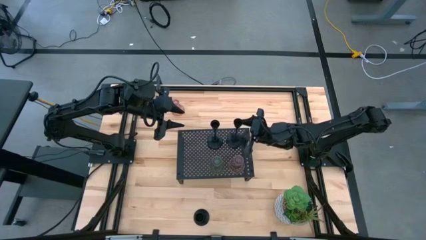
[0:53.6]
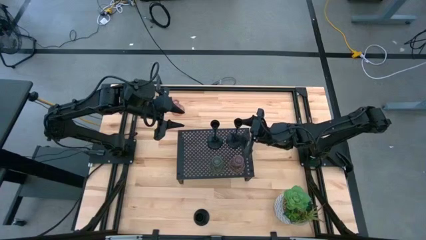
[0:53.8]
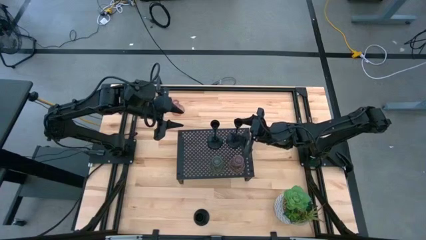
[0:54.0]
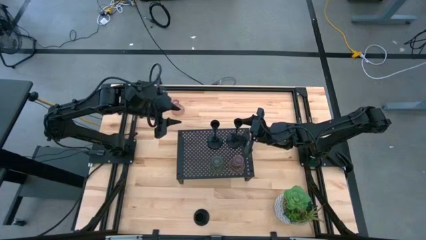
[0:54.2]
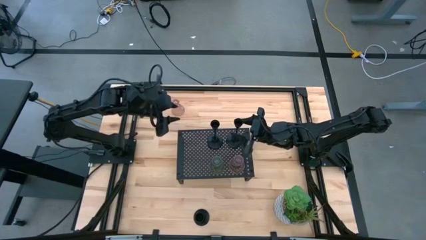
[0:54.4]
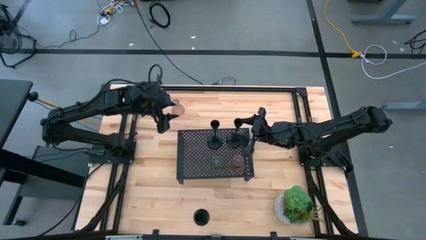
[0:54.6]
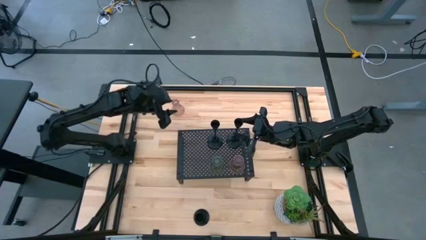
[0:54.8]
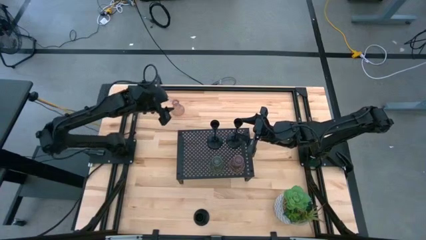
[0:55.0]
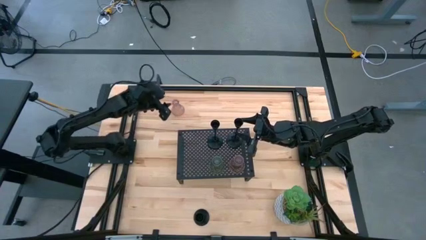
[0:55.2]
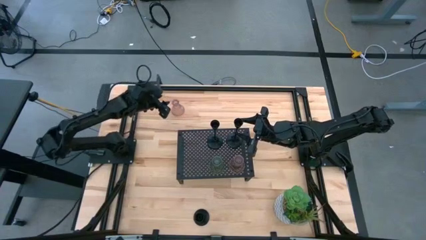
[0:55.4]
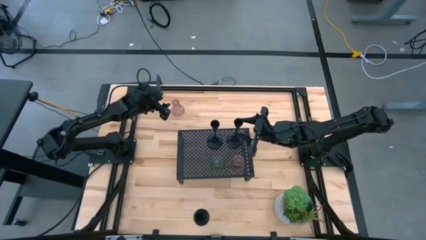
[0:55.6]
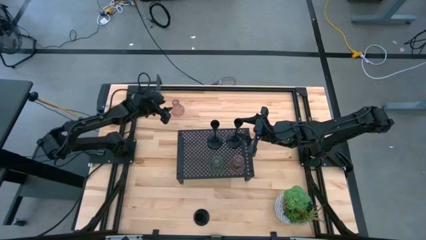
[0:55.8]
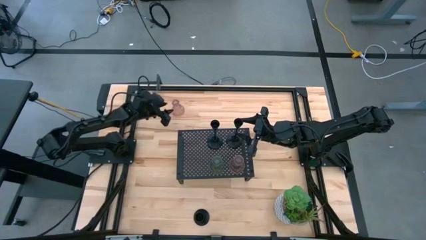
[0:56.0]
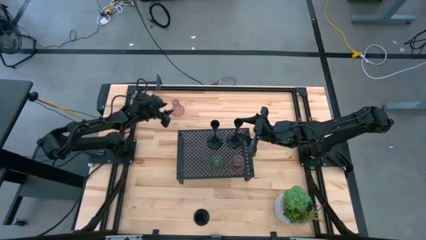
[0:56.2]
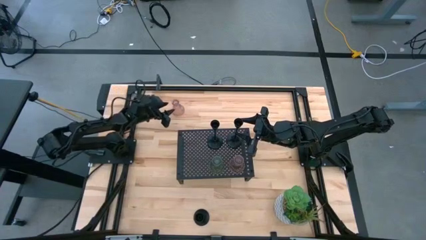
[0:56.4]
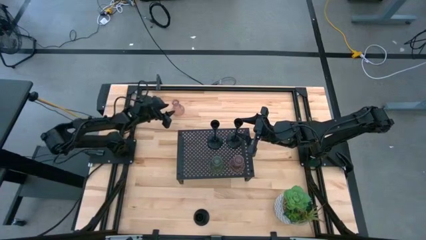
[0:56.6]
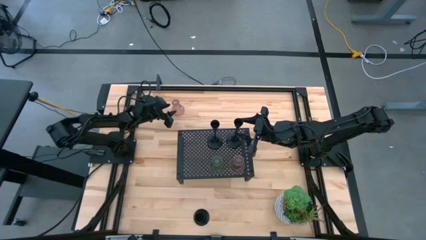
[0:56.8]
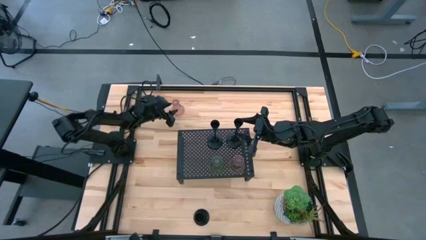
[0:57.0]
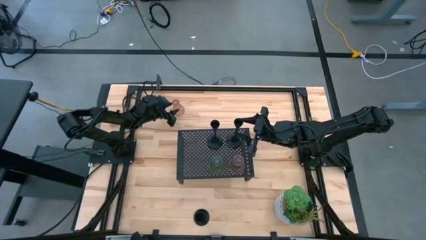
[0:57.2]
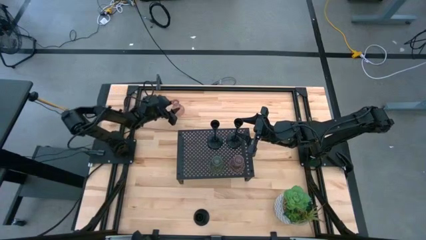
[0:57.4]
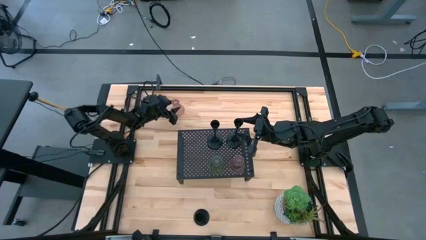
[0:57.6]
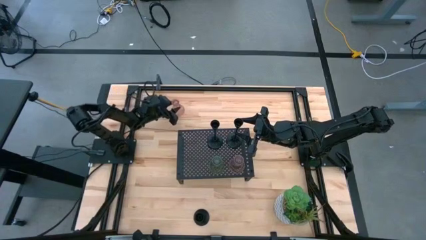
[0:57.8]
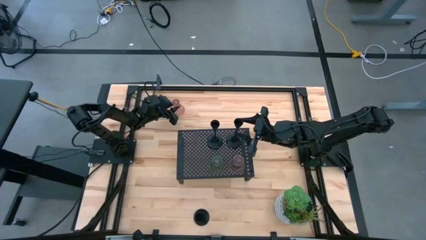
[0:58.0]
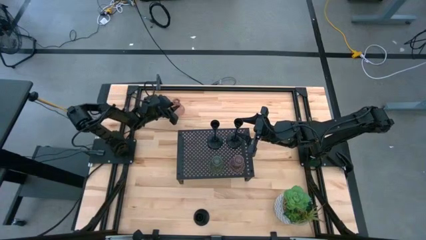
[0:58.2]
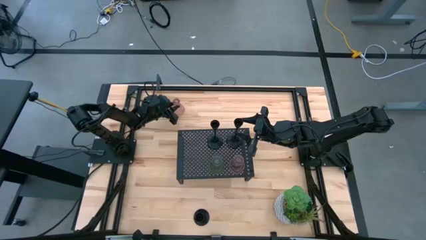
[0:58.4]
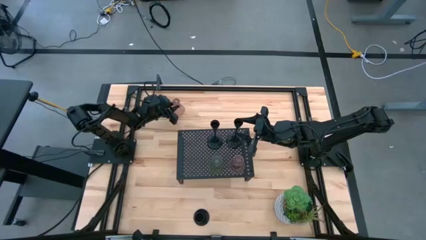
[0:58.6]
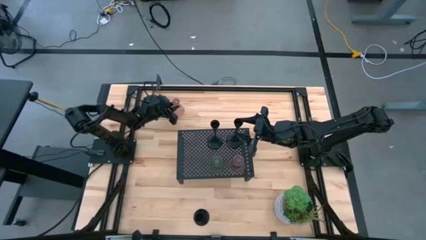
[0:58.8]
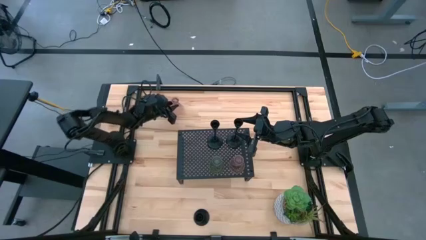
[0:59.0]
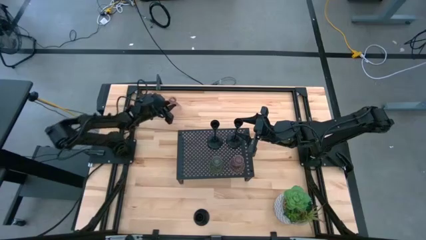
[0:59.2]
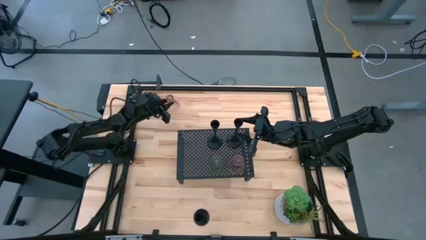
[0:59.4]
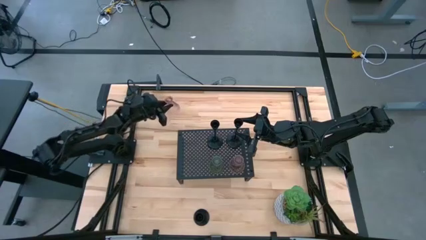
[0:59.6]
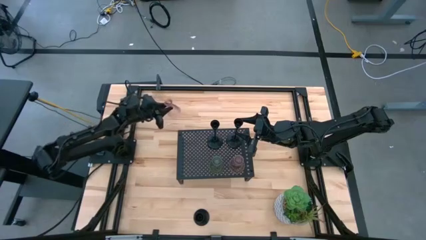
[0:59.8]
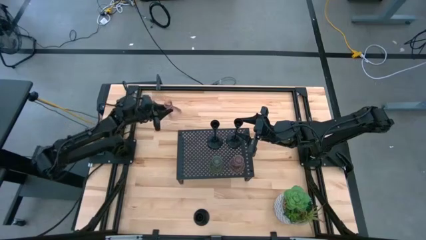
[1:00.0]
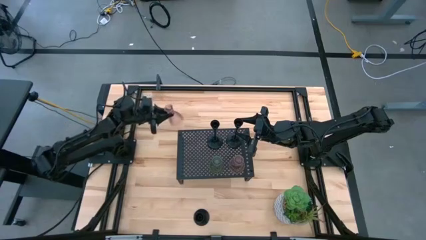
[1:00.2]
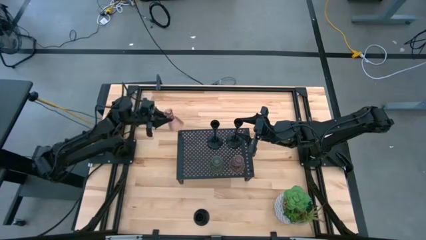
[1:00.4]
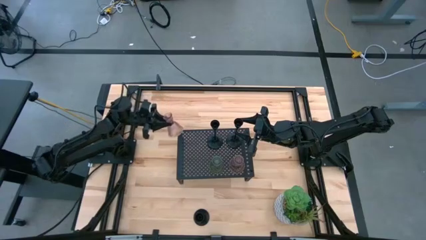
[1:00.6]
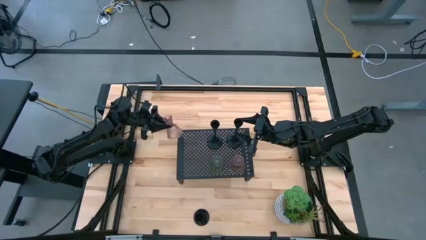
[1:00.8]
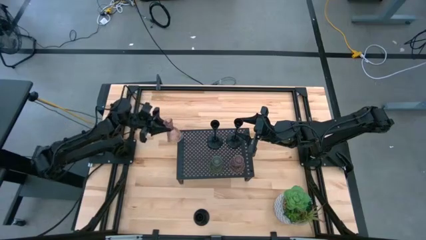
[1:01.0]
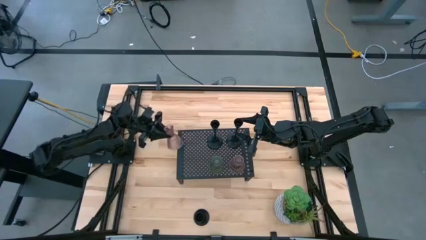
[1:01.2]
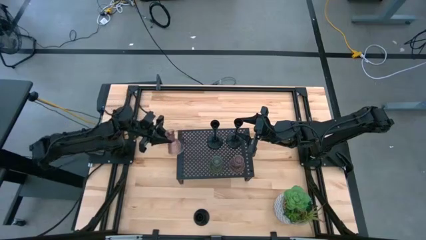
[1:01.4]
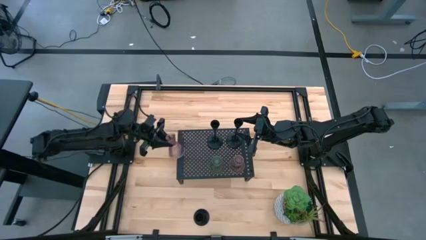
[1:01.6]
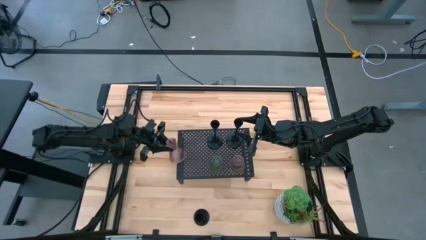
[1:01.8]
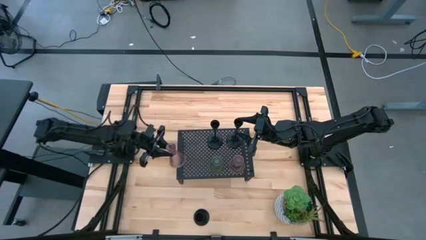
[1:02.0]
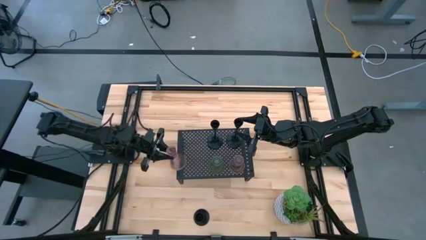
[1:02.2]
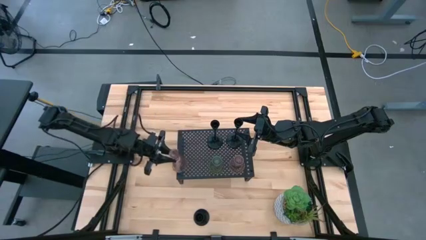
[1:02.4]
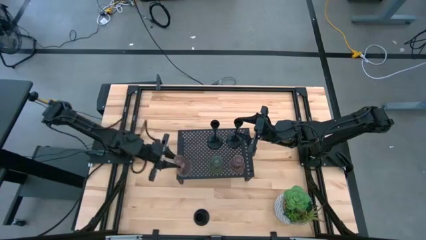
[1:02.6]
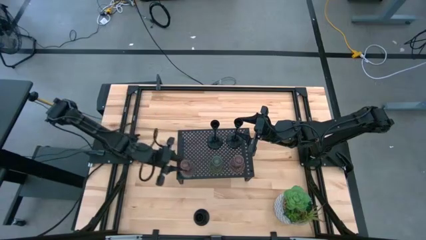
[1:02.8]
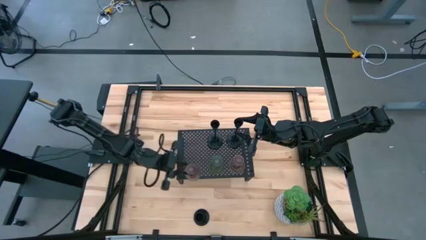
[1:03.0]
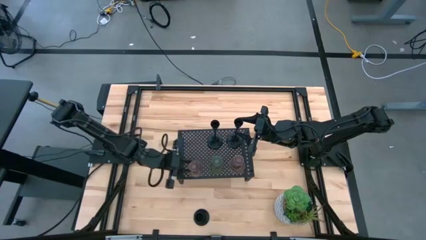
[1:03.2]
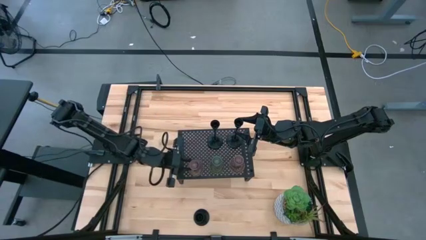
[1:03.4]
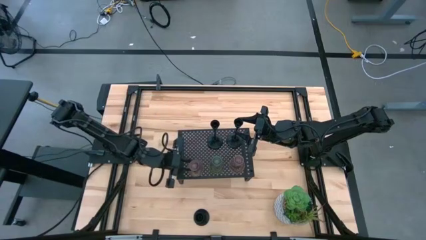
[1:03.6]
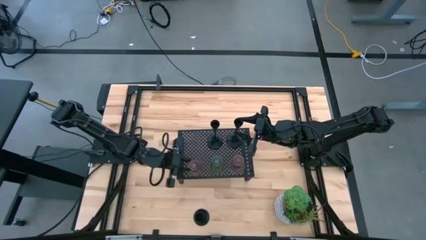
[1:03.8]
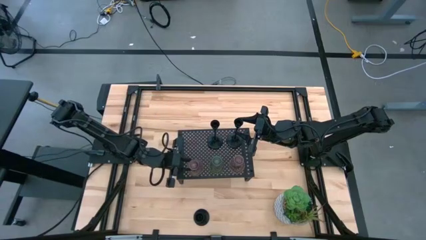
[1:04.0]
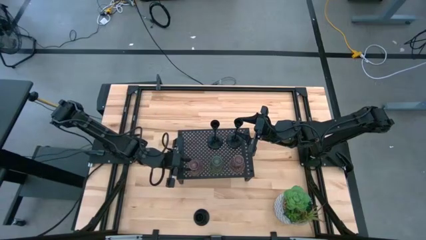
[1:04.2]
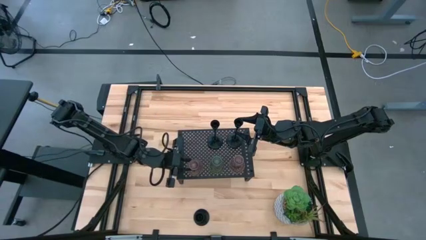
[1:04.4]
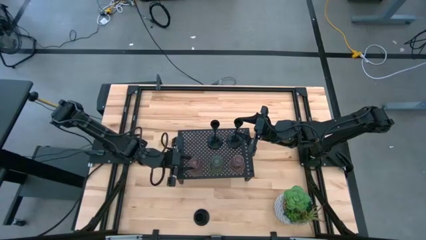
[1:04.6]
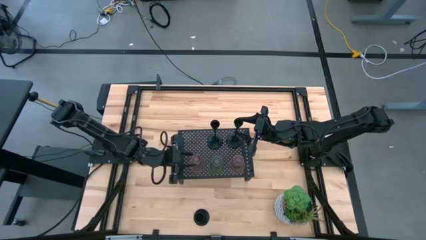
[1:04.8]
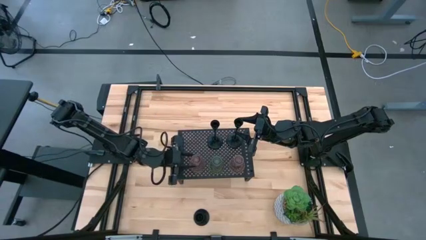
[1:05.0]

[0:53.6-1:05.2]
Task: Pick & Place candle stick holders
Align the purple candle holder on the shelf with the green and purple candle holders
